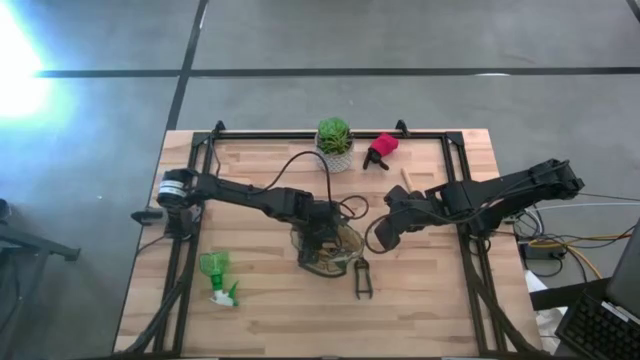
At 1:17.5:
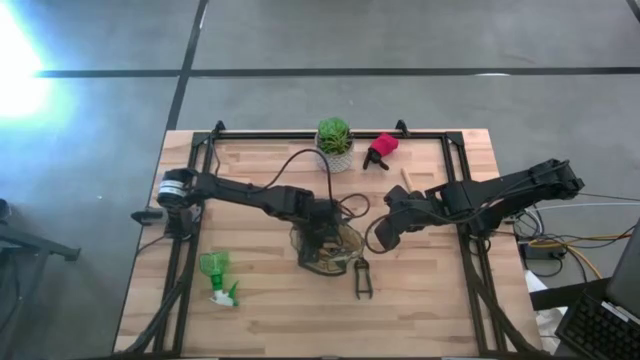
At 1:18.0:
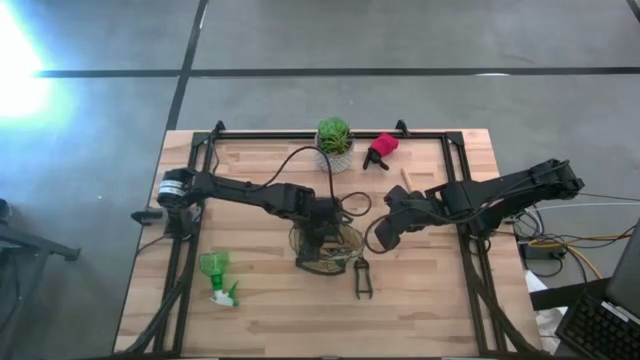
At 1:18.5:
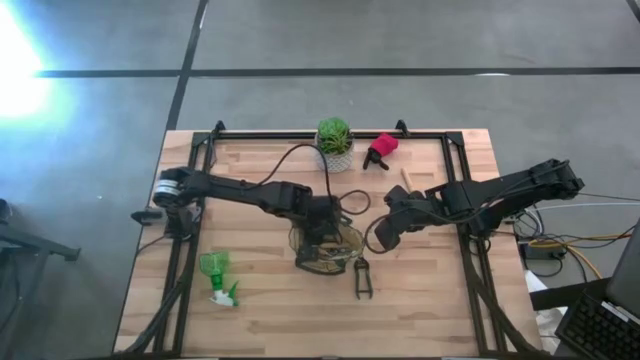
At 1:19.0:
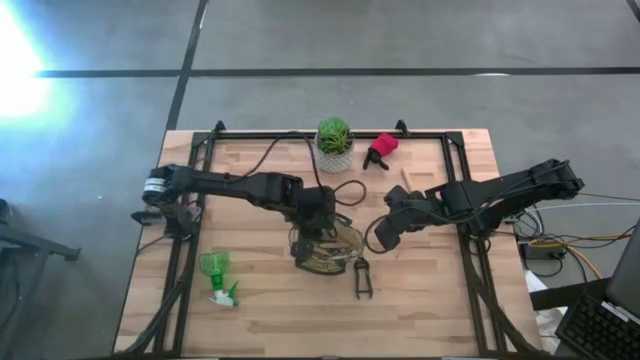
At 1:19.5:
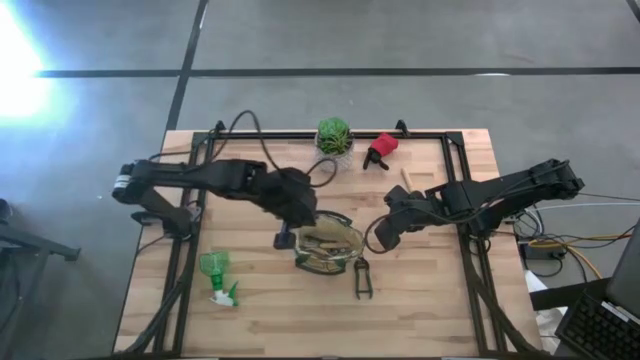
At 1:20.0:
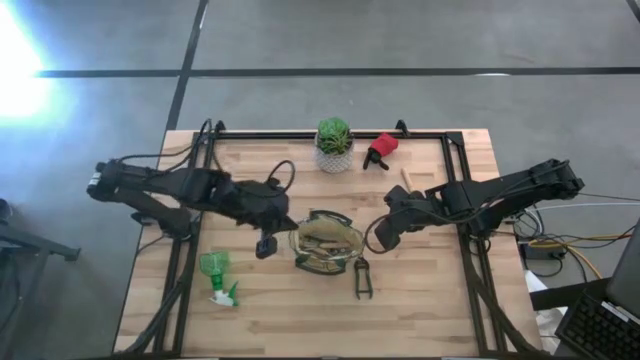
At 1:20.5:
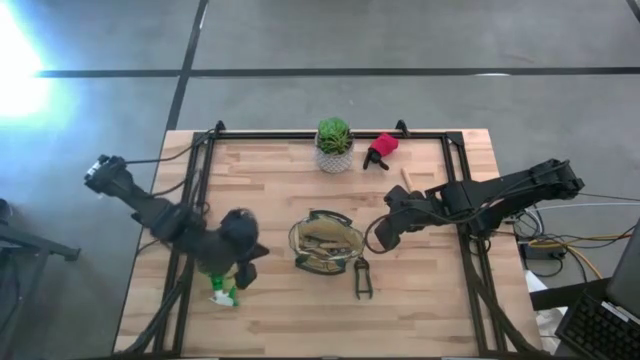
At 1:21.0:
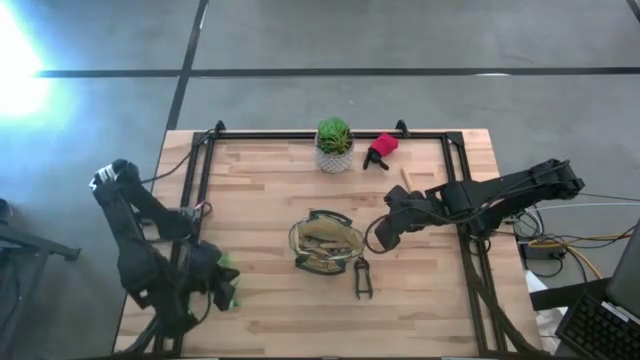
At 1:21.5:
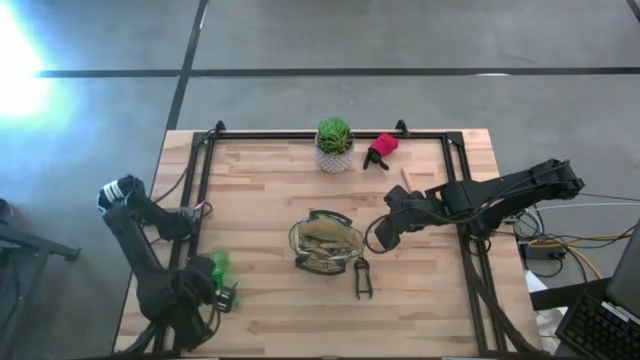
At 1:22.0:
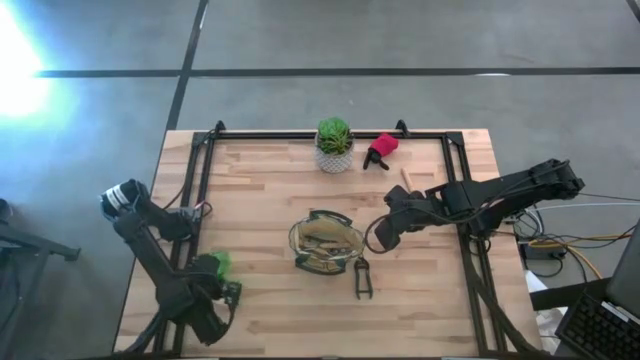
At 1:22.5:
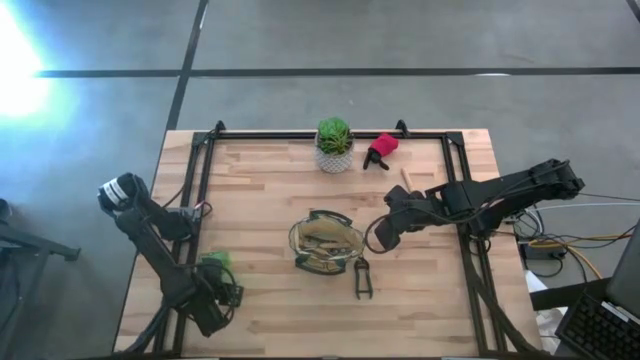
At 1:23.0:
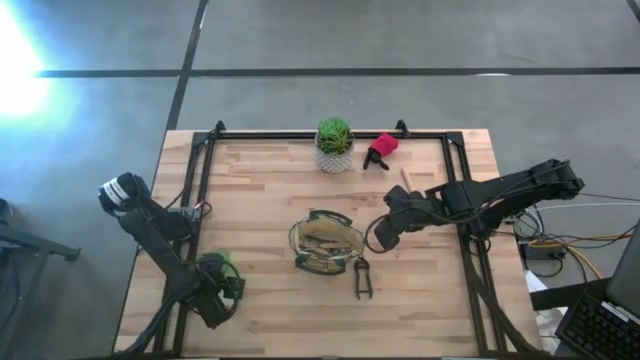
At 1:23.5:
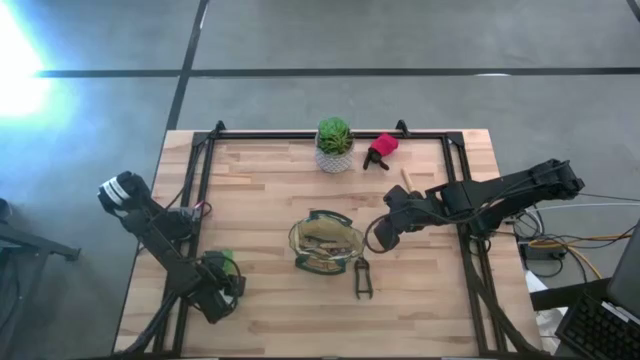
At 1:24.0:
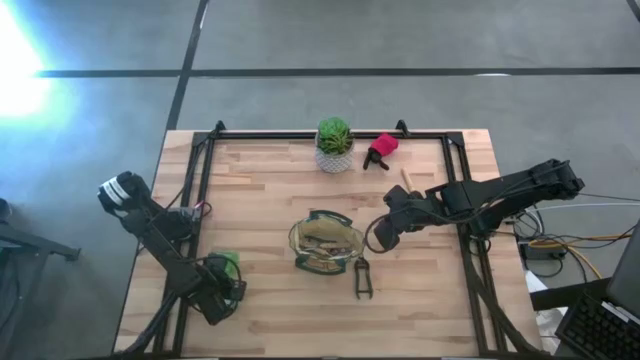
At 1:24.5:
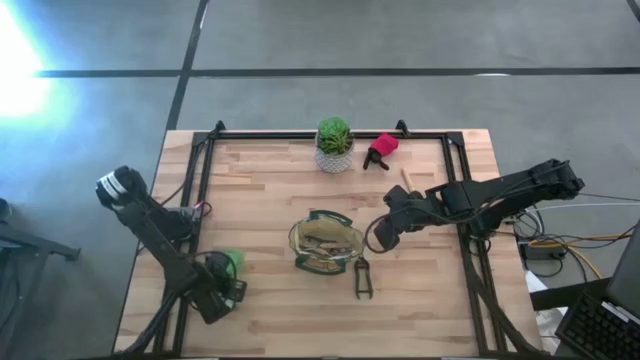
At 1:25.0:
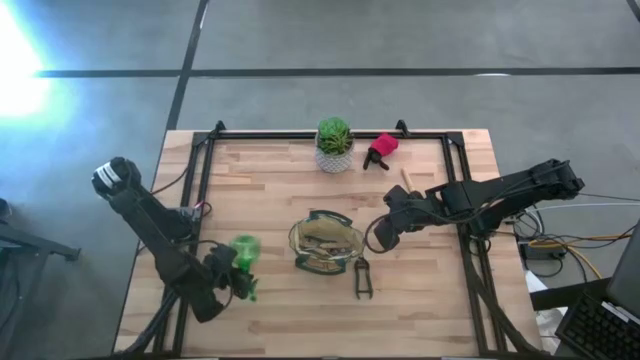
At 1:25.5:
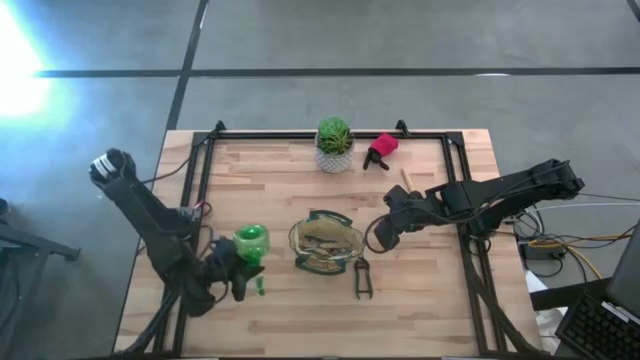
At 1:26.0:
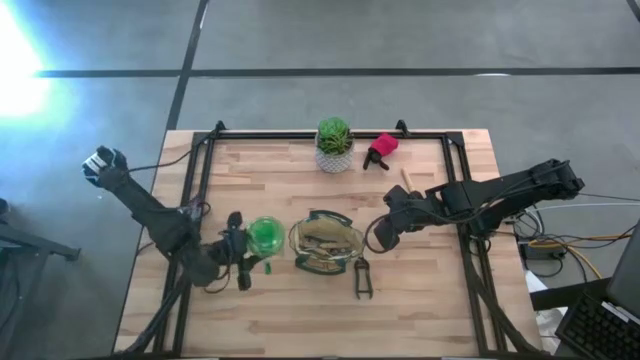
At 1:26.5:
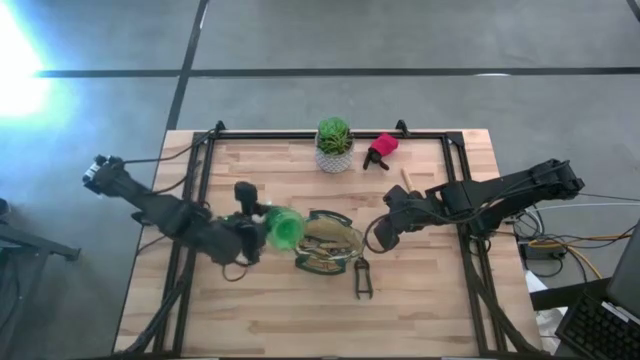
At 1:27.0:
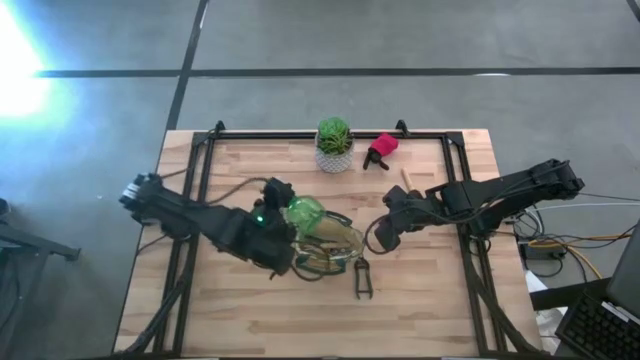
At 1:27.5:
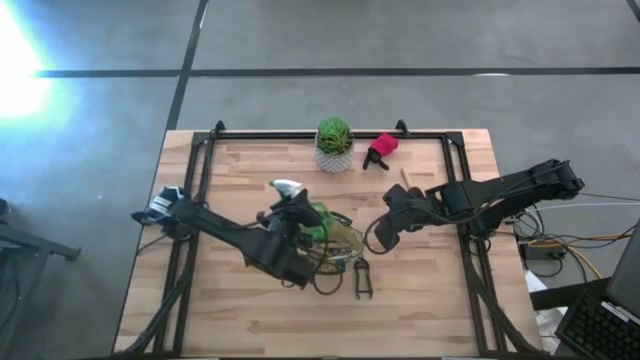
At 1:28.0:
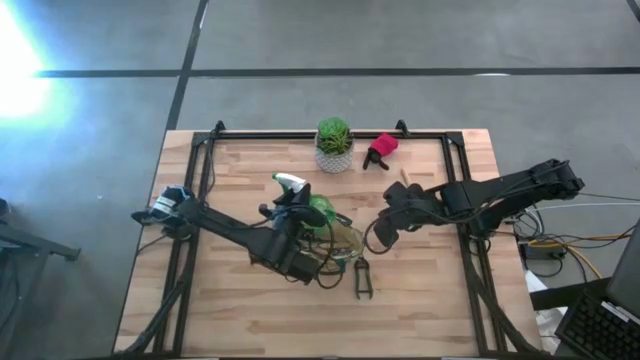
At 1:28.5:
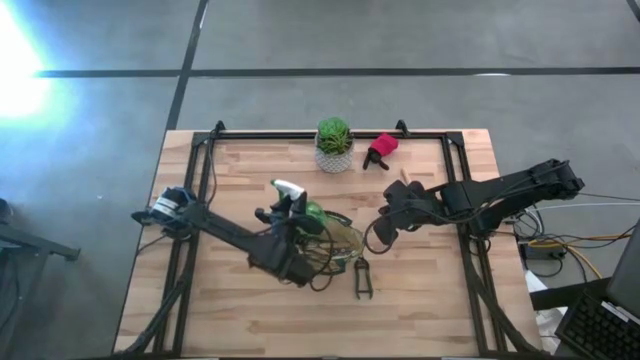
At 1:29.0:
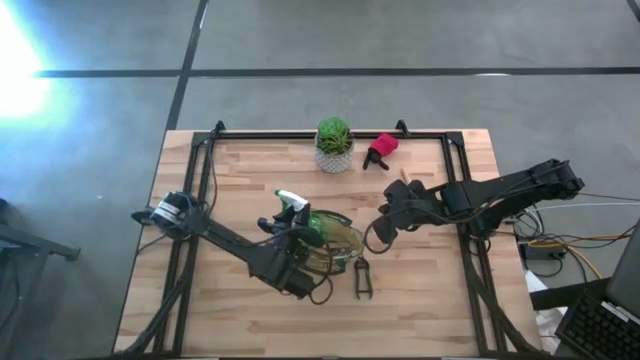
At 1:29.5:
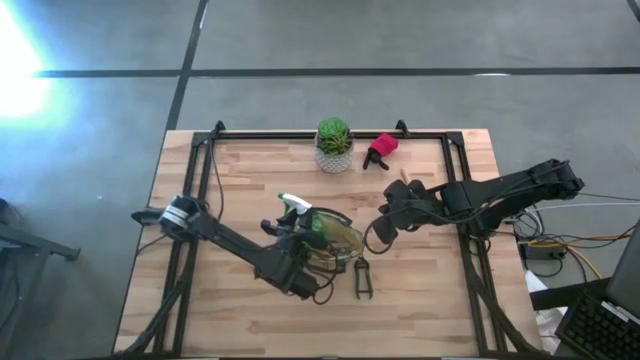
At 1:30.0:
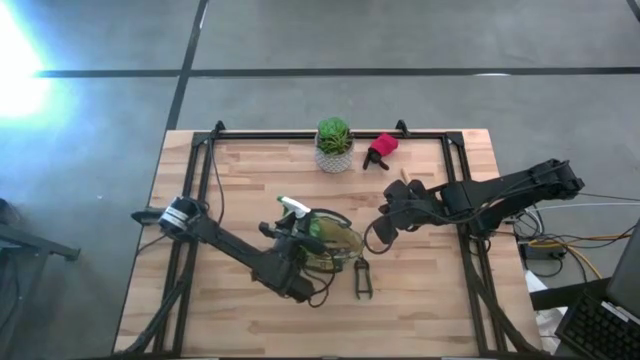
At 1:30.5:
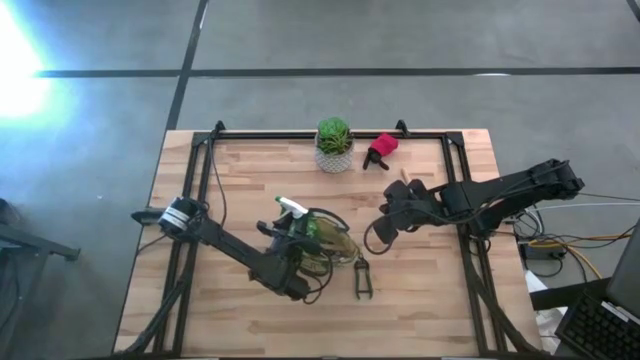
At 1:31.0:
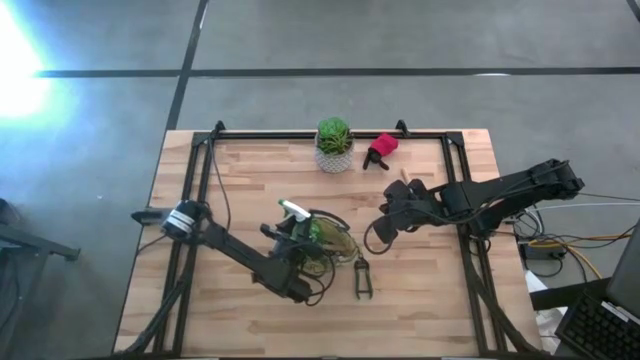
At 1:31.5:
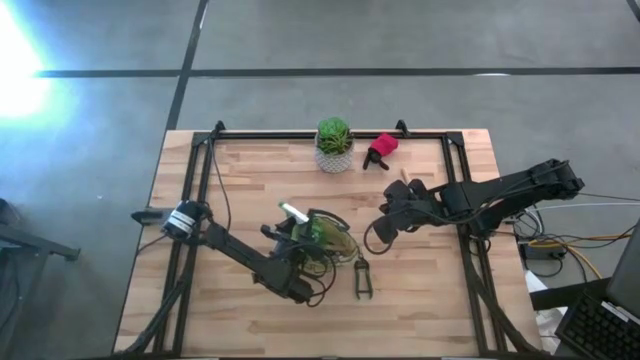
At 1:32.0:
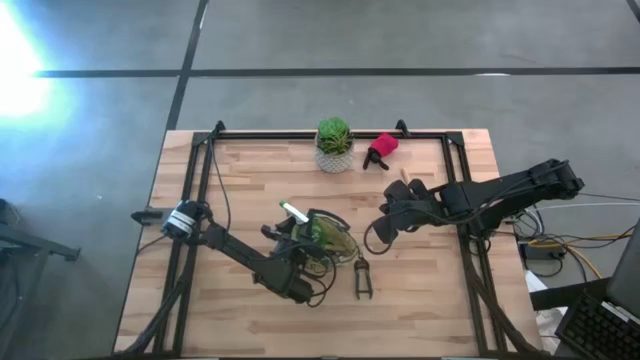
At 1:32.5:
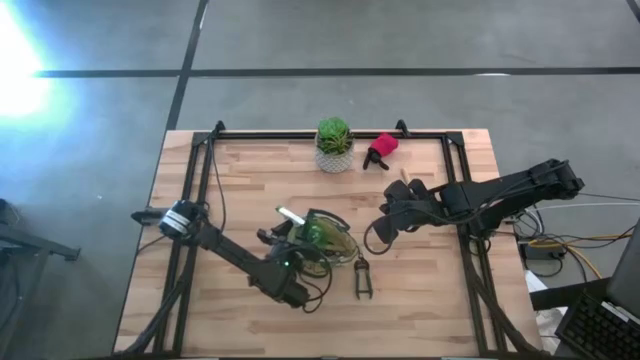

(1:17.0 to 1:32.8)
Task: Pick & Place Garden tools in Gardening bag
Put the green spray bottle into the white gardening bag

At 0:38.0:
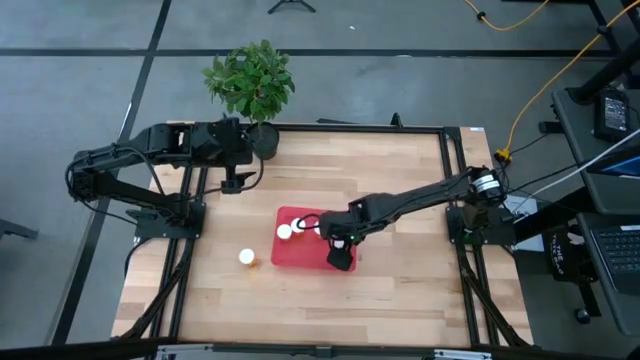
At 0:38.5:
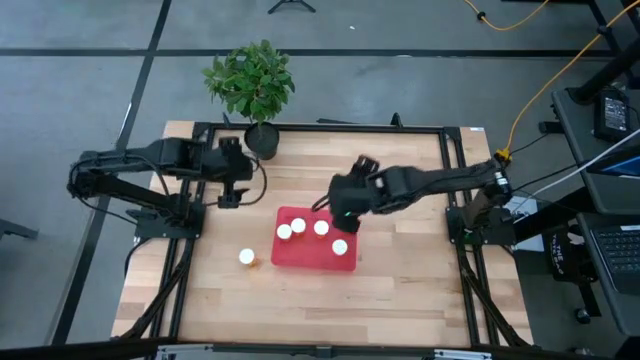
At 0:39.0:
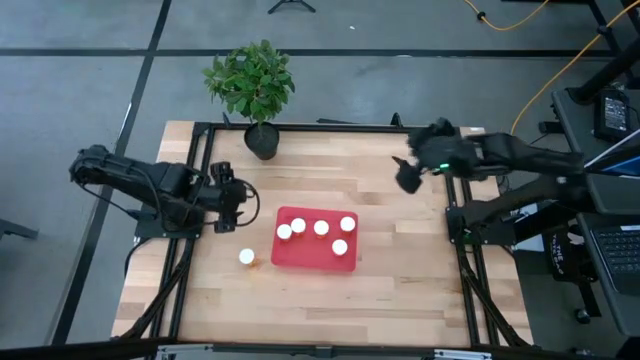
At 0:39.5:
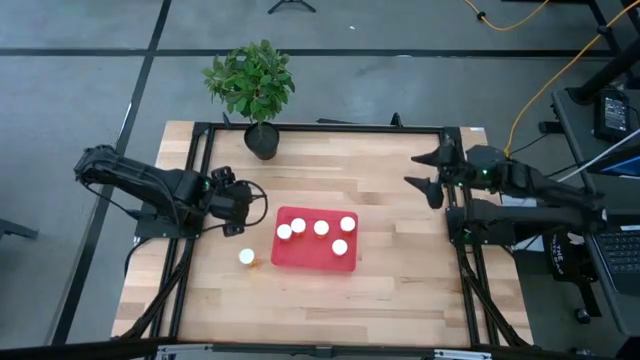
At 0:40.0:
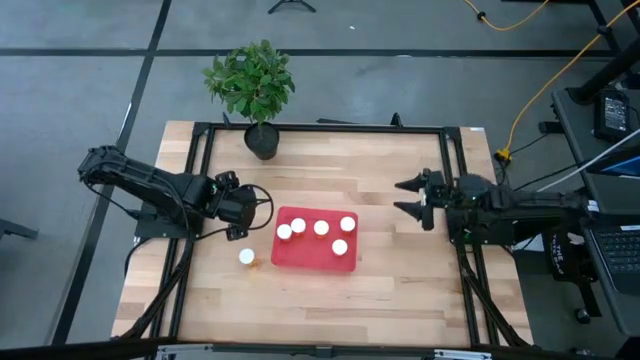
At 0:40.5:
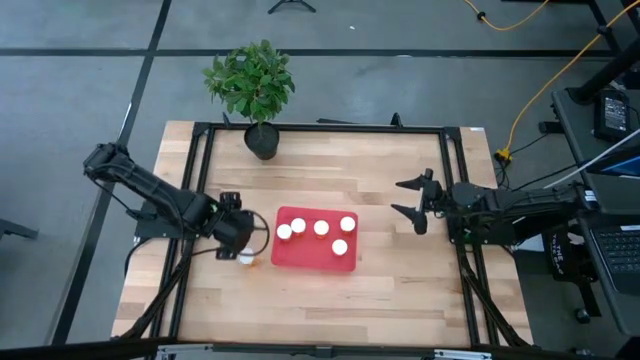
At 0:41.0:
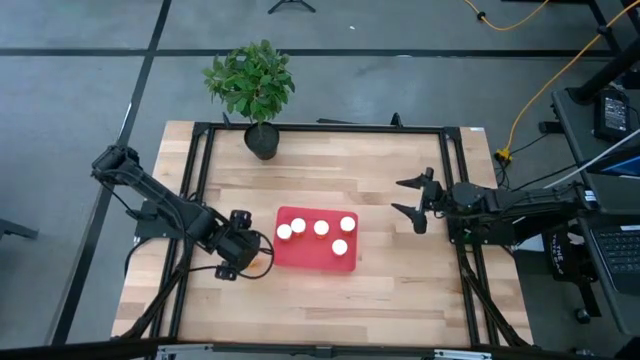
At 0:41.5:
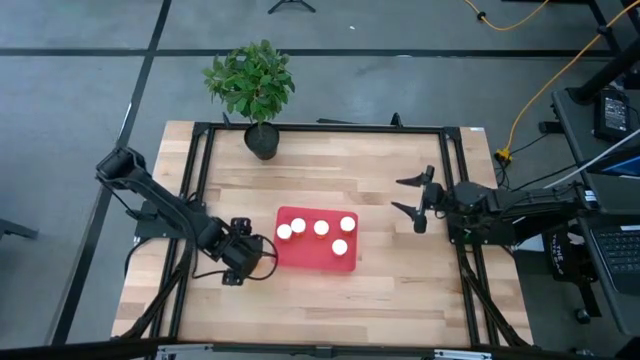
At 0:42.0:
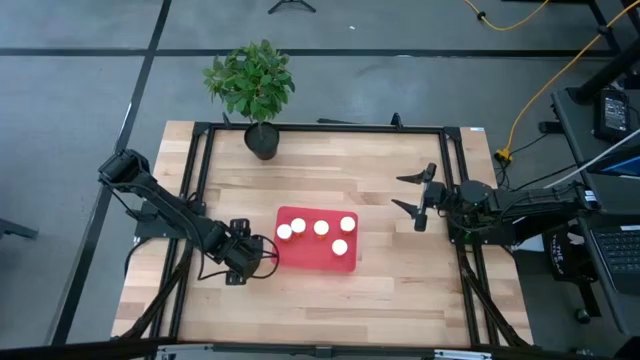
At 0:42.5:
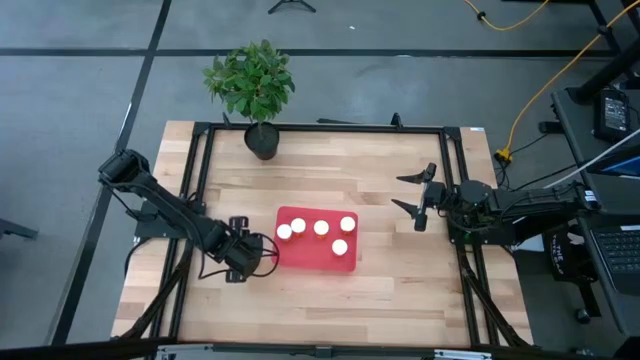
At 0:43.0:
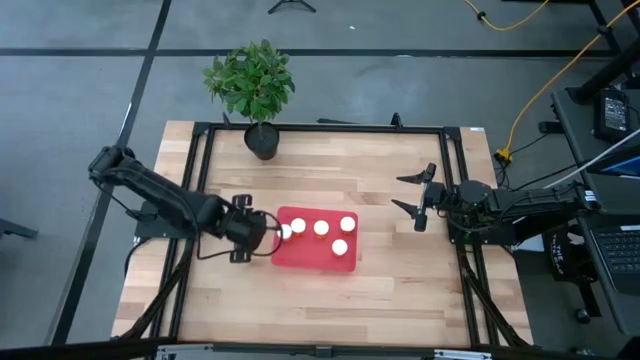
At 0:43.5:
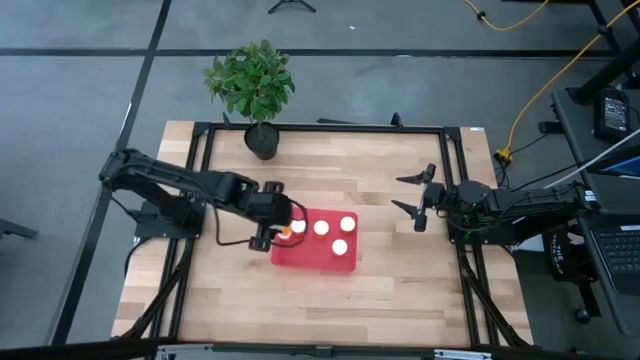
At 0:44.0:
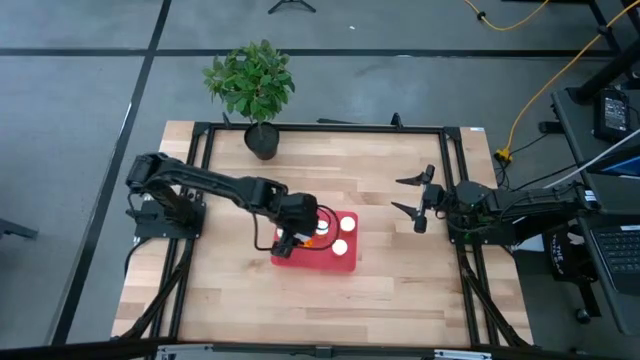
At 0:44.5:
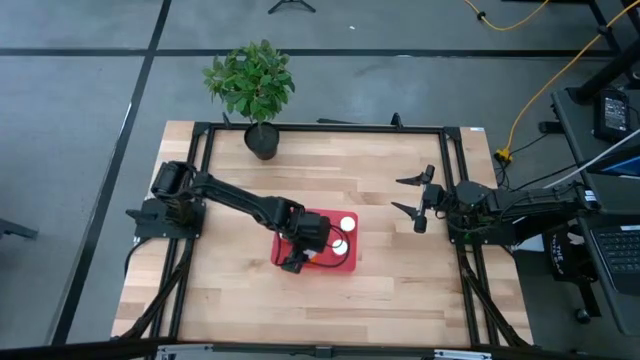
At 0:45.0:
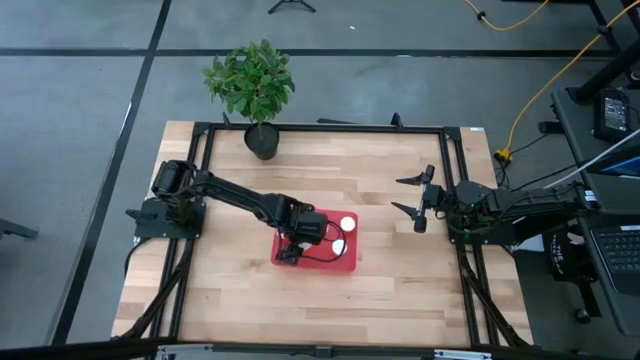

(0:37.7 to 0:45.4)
Task: Pick and place pill bottles into a basket
Put the orange pill bottle into the bin
